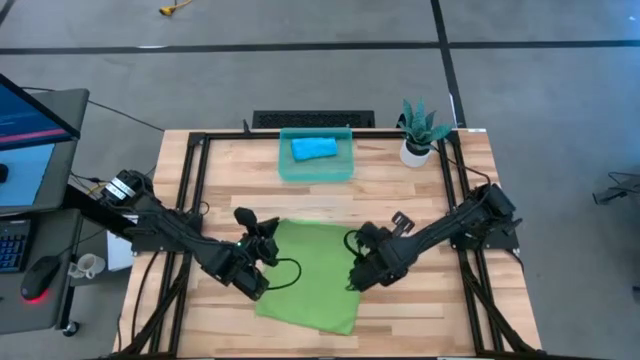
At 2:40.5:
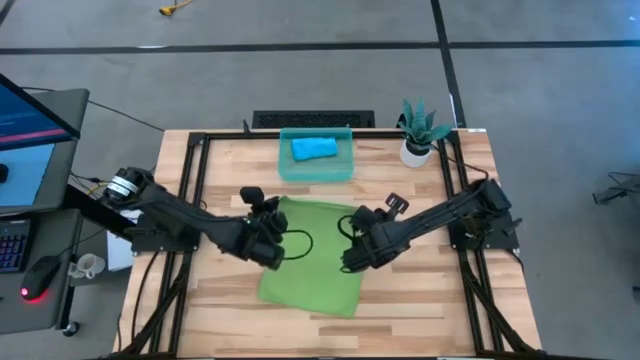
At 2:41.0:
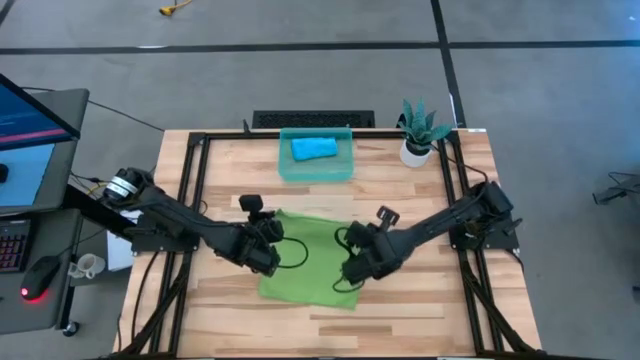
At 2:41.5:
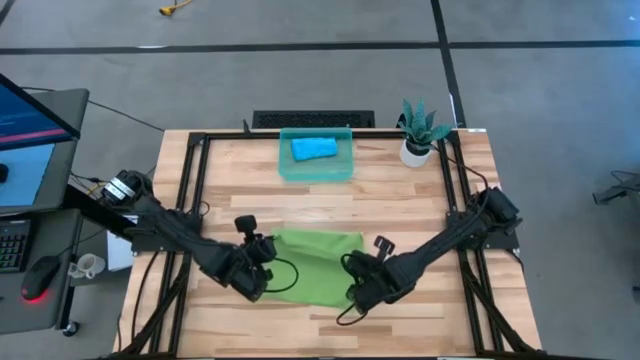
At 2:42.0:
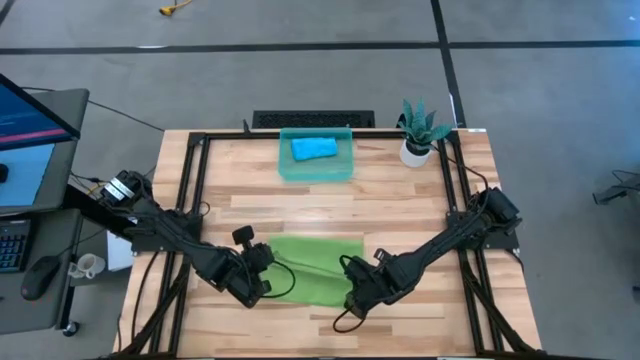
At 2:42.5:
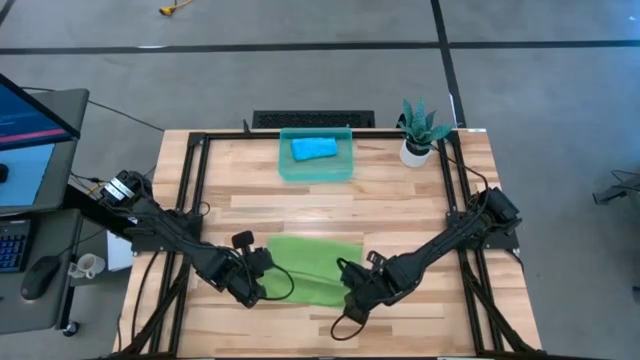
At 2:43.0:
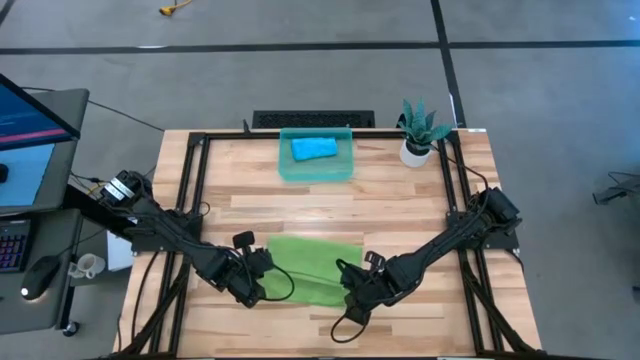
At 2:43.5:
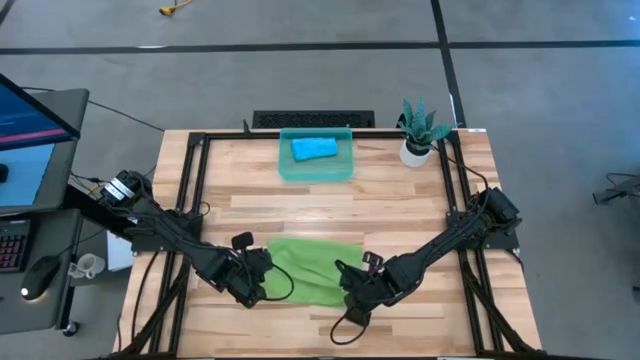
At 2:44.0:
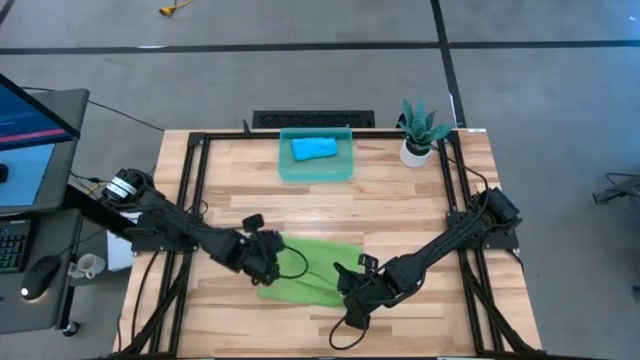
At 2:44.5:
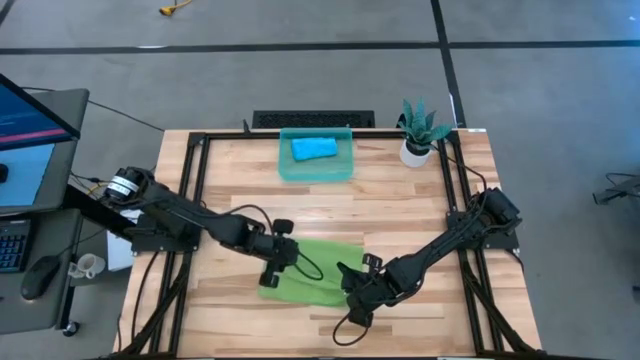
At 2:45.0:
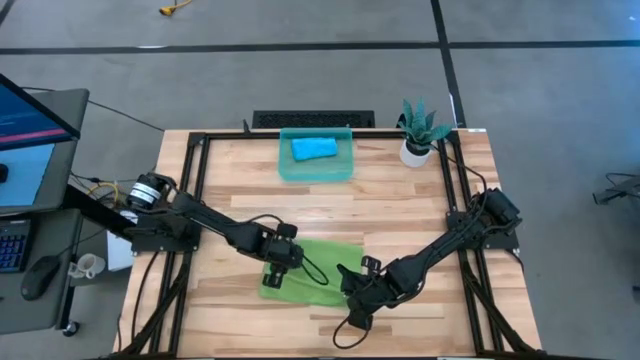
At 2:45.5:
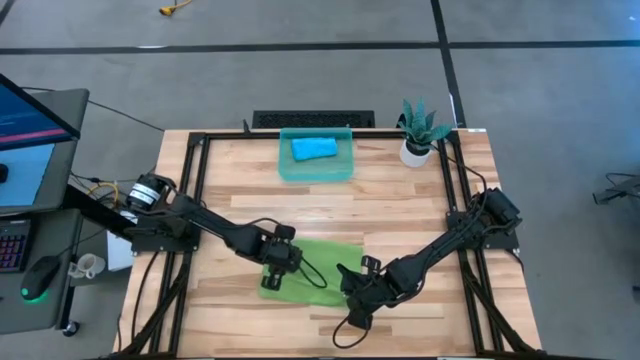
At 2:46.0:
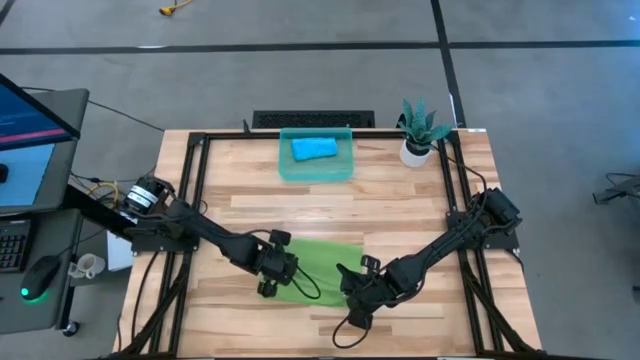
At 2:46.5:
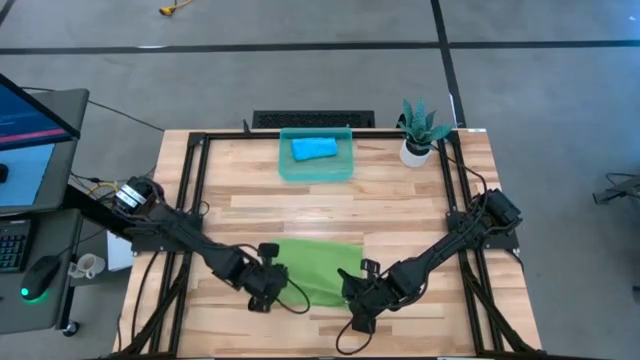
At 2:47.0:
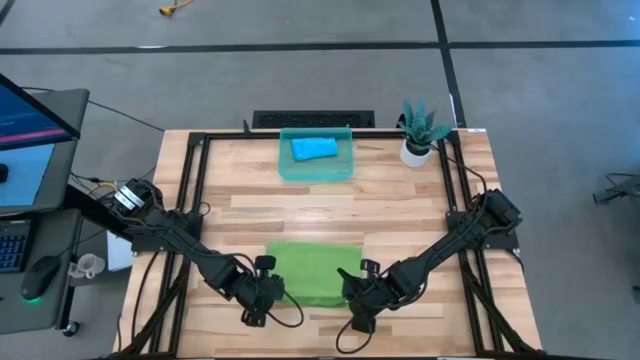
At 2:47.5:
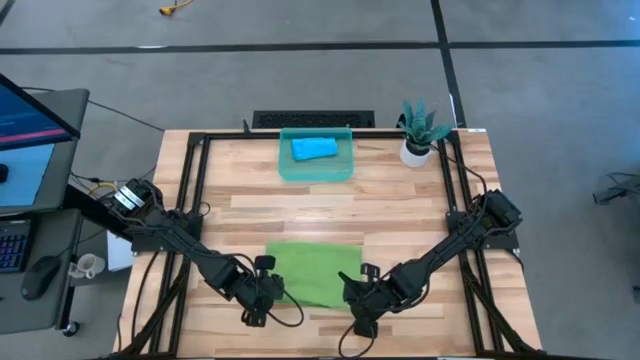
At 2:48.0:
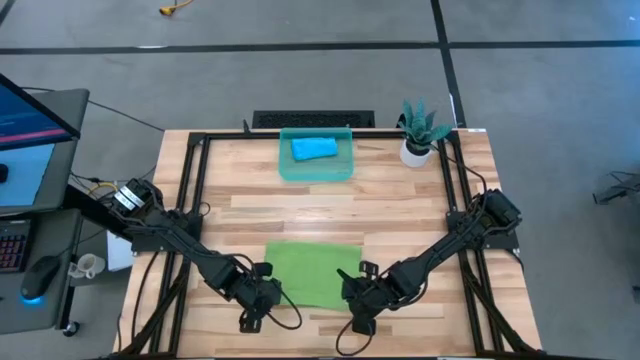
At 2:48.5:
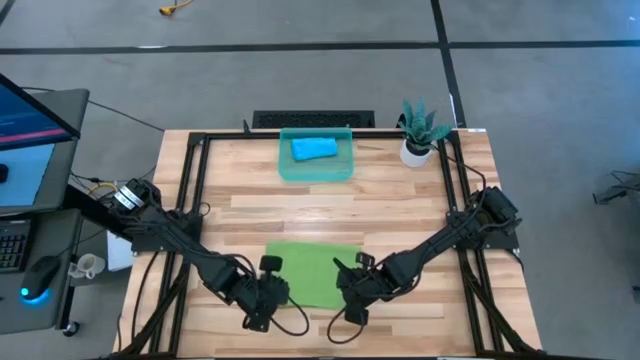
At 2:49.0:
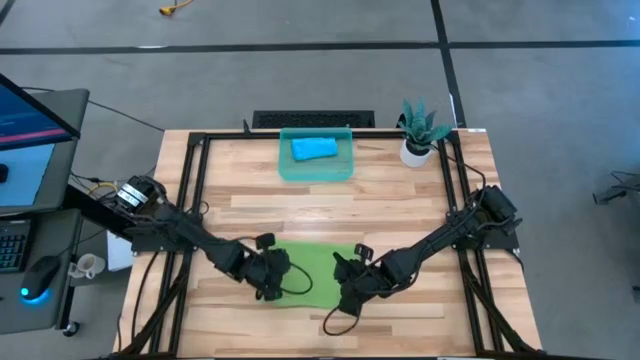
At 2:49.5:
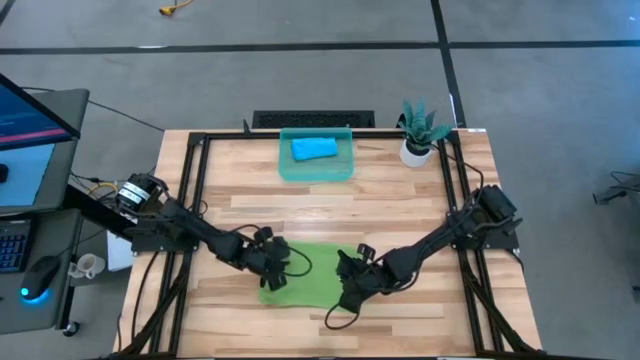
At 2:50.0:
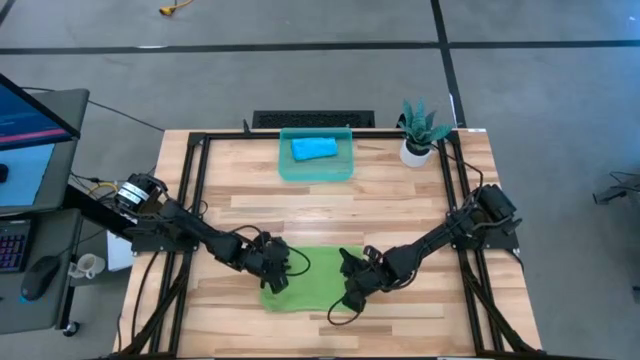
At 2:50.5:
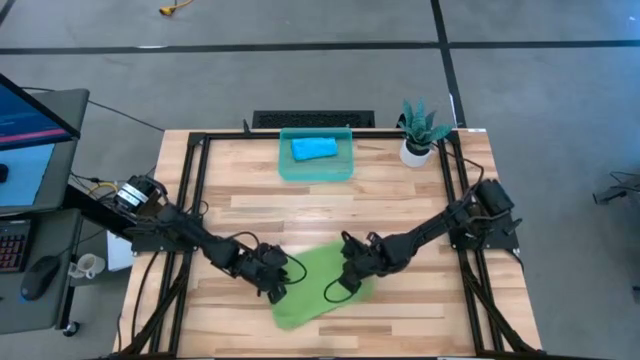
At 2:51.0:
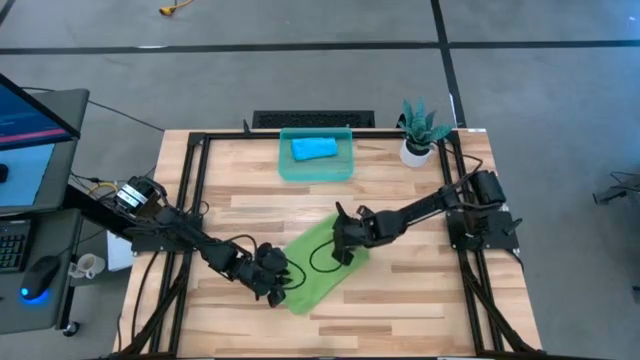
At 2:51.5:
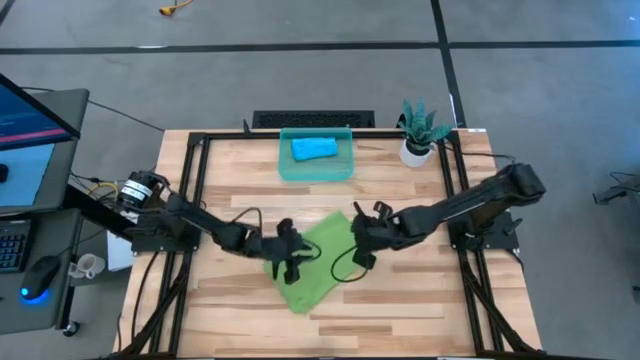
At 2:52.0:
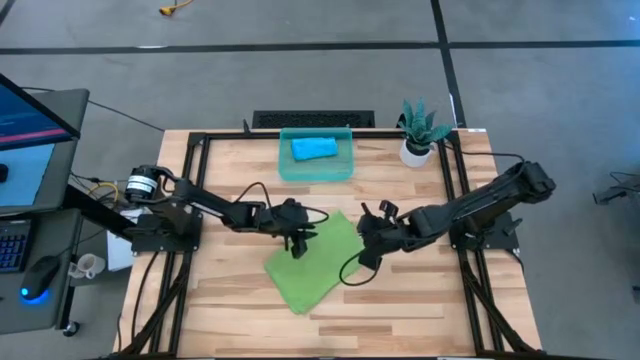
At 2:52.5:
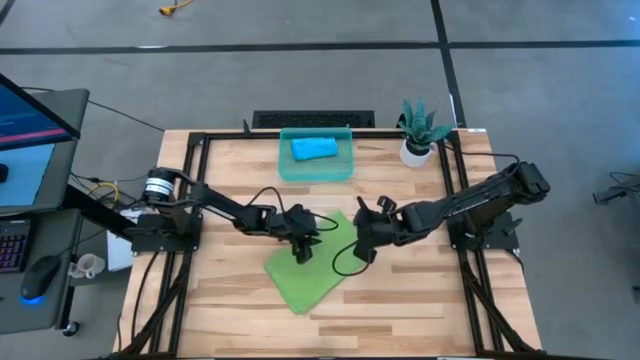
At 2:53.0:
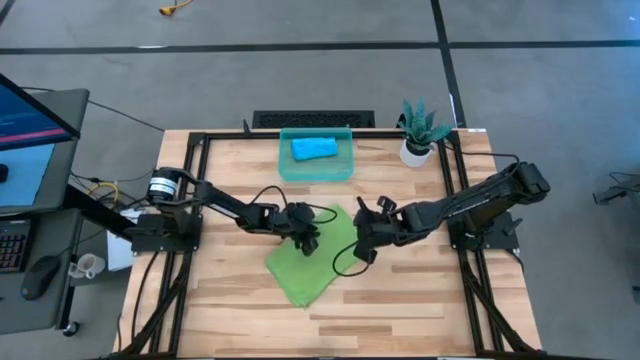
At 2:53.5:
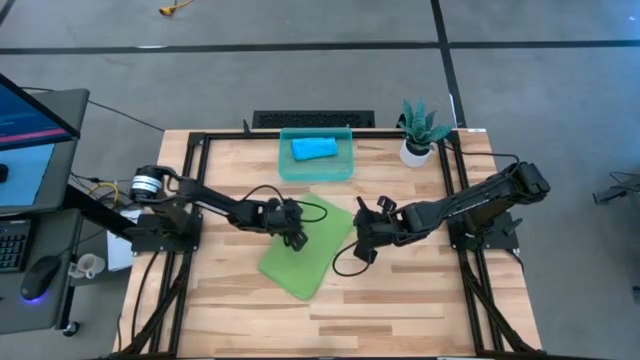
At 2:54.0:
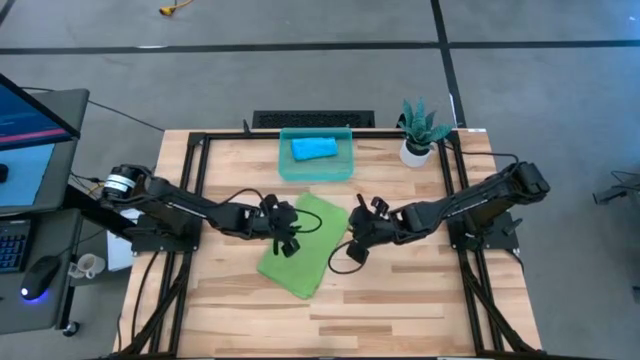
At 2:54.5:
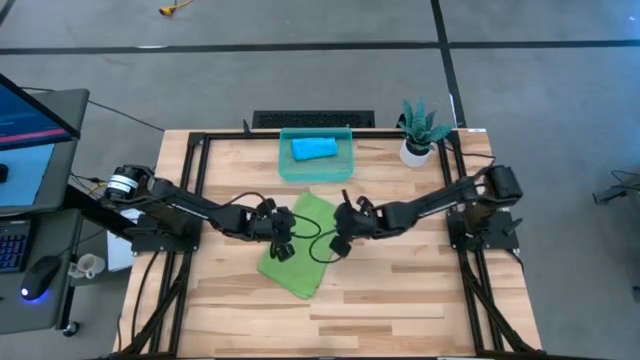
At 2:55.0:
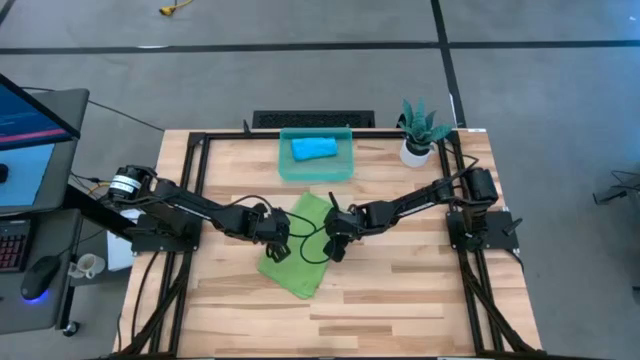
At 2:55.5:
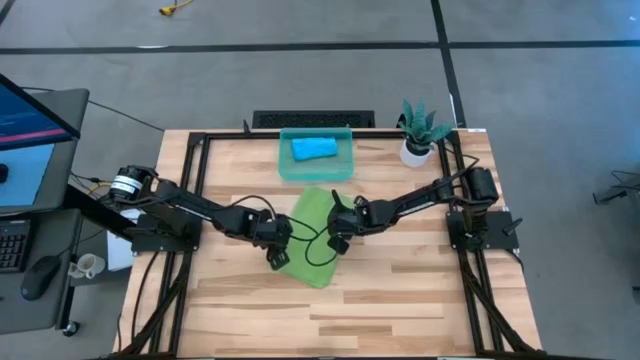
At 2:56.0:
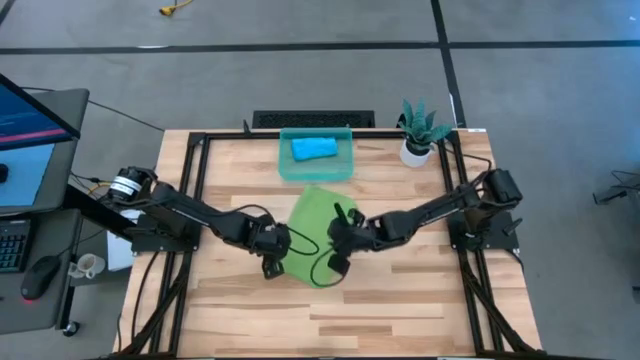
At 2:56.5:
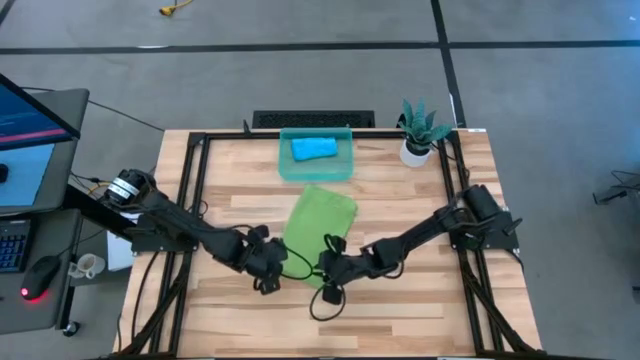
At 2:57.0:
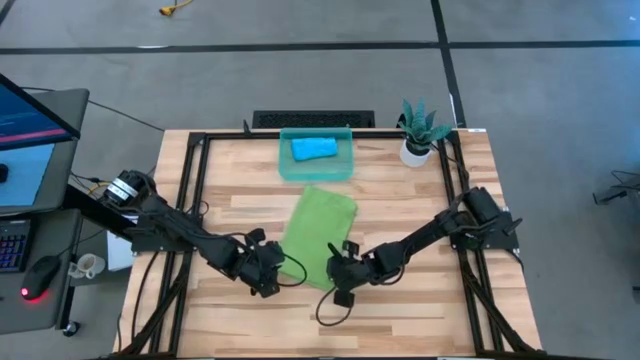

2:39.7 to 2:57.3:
Task: Roll microfiber towels into tight, uniform cylinder then place into a basket
Fold the green microfiber cloth

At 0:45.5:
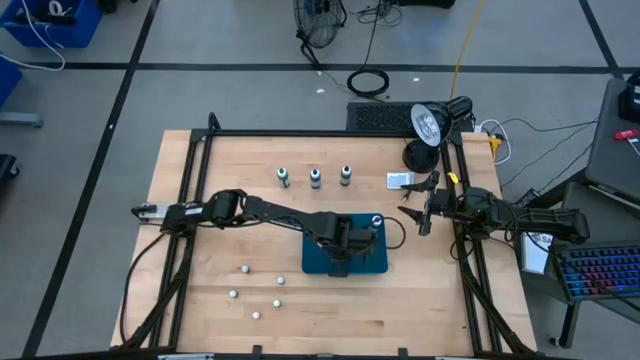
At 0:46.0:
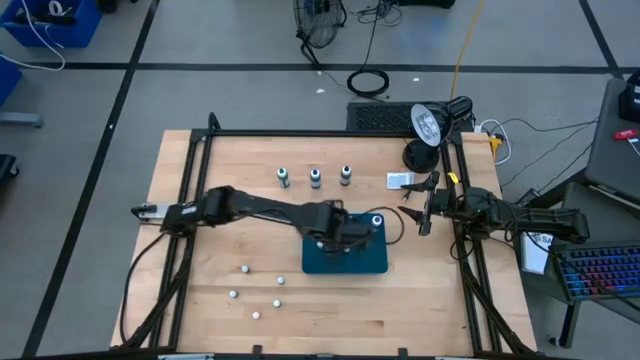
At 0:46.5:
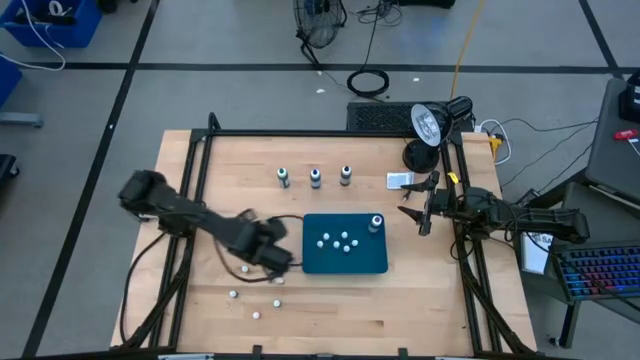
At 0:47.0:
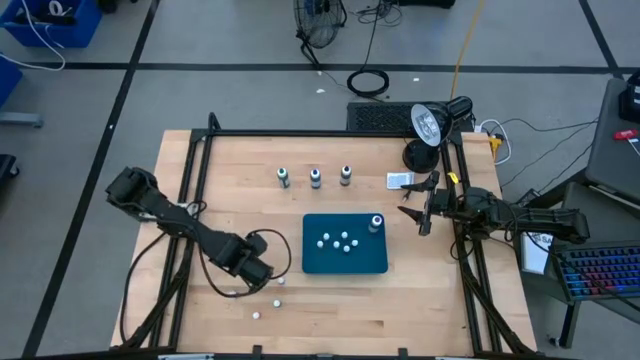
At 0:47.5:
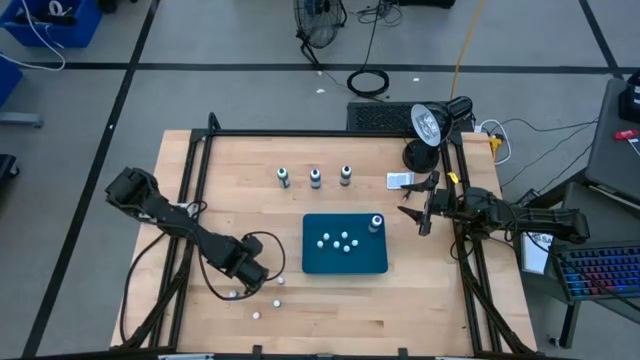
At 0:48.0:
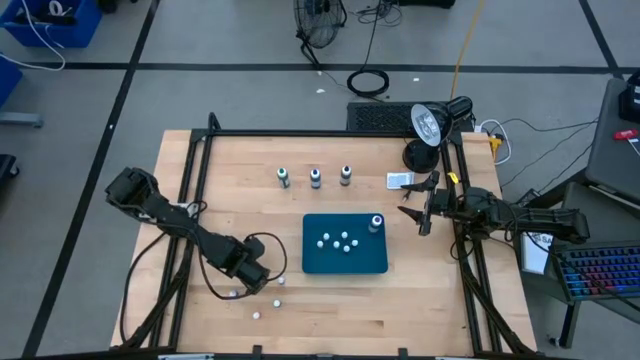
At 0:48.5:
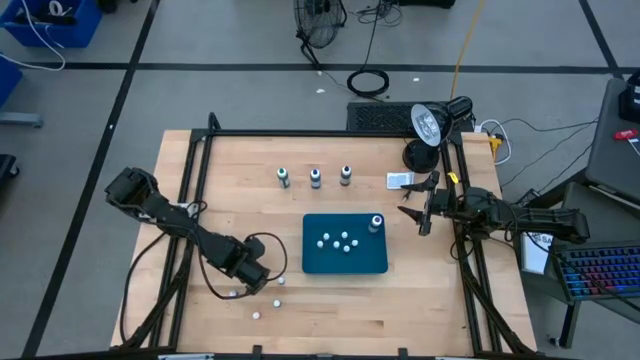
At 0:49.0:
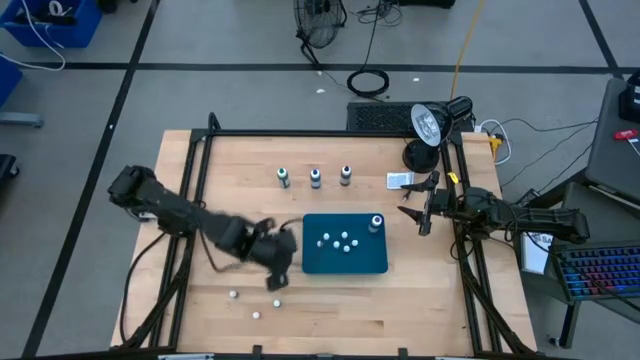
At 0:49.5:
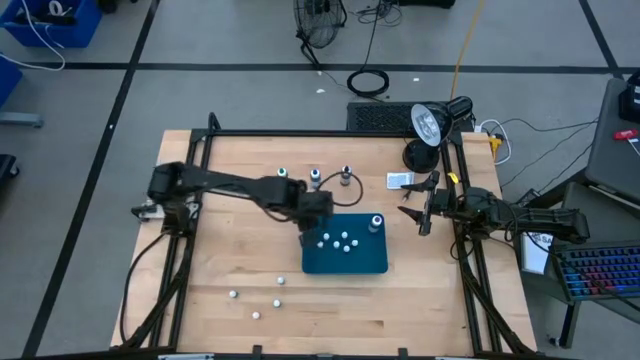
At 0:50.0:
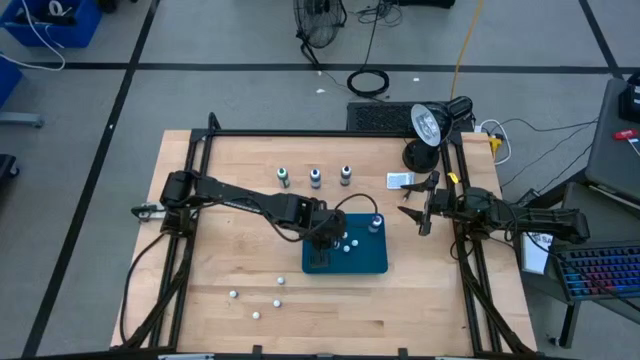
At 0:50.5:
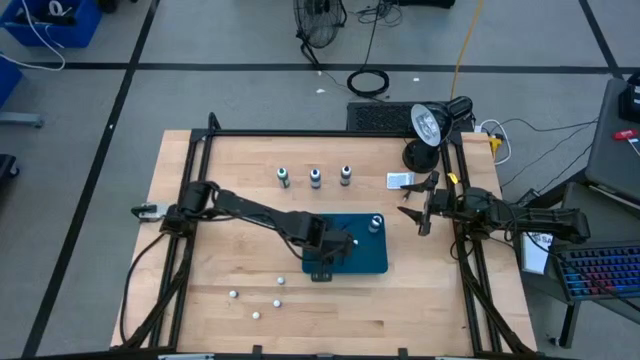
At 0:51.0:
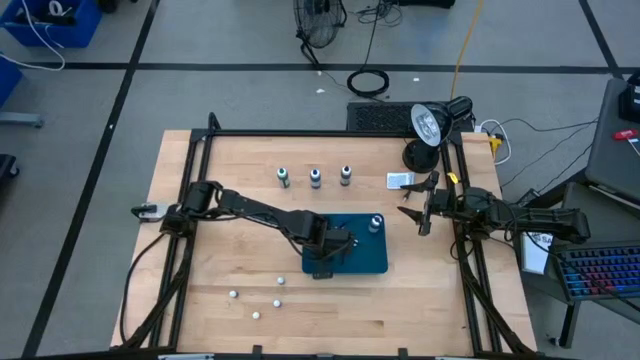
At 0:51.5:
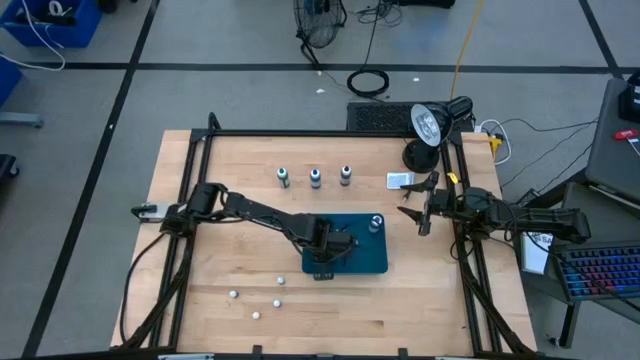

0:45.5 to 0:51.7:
Task: Pick & Place food coloring
Put the small purple food coloring bottle into the blue bin
